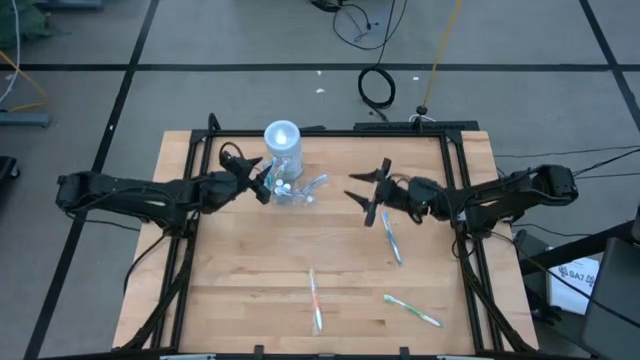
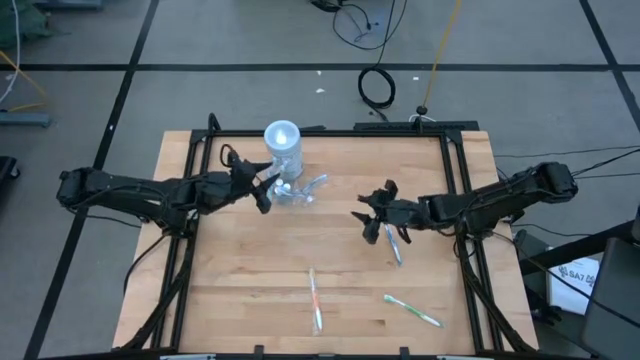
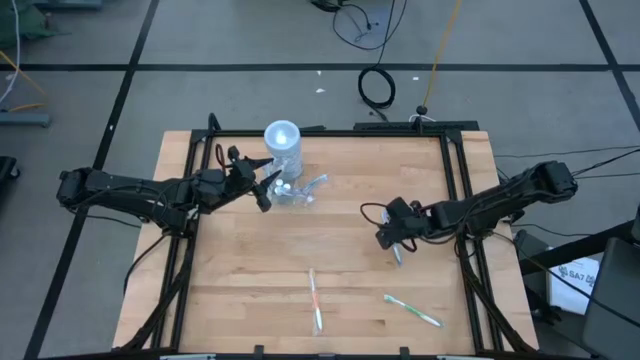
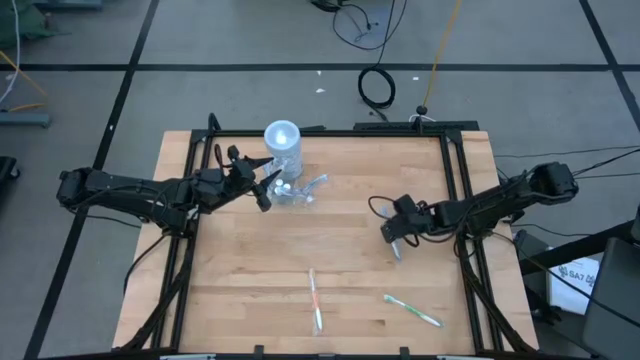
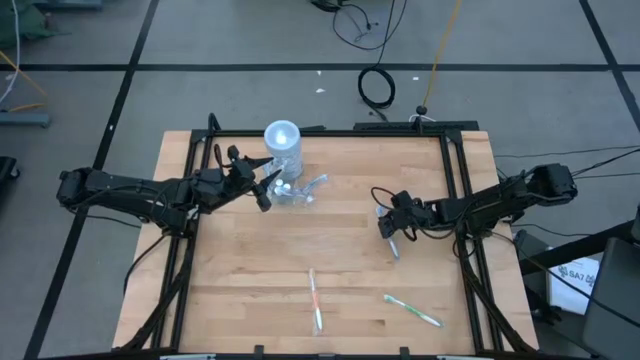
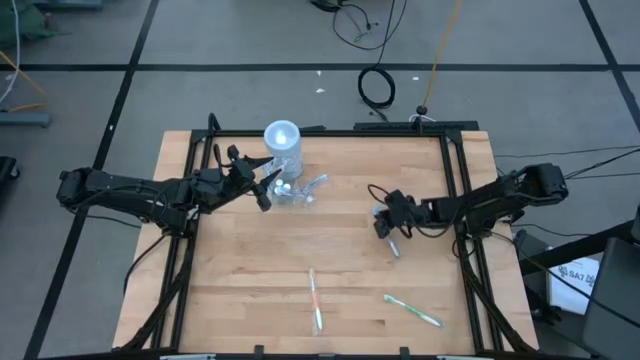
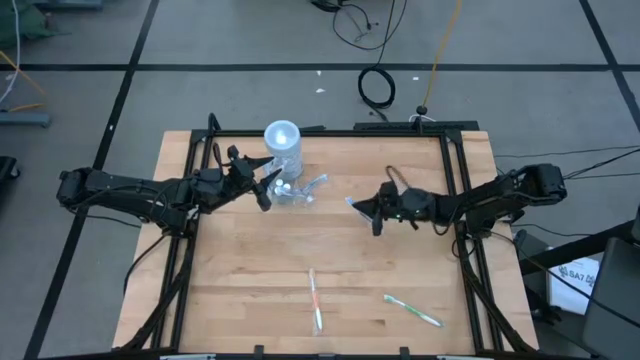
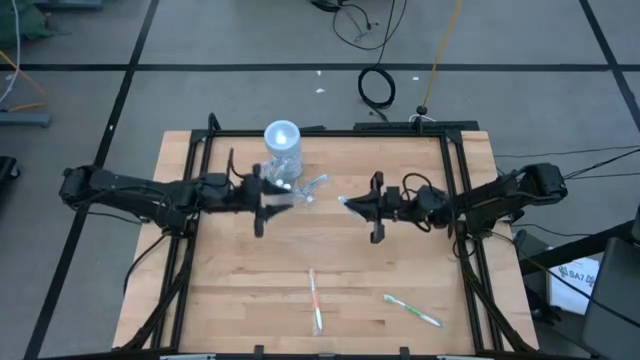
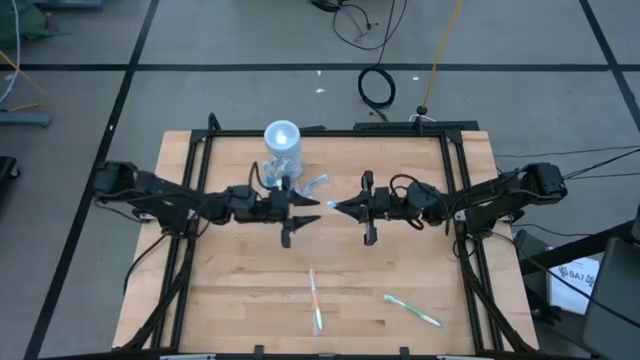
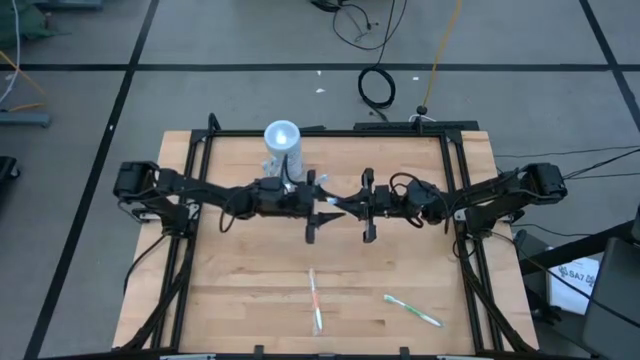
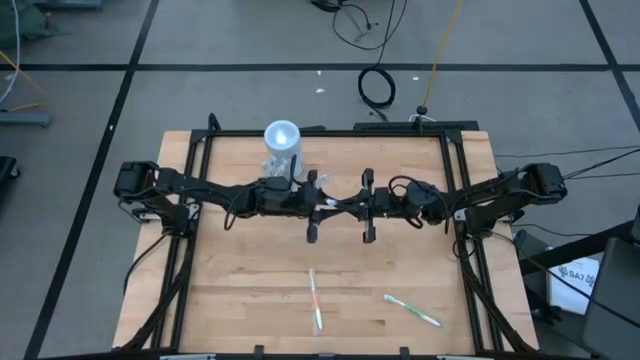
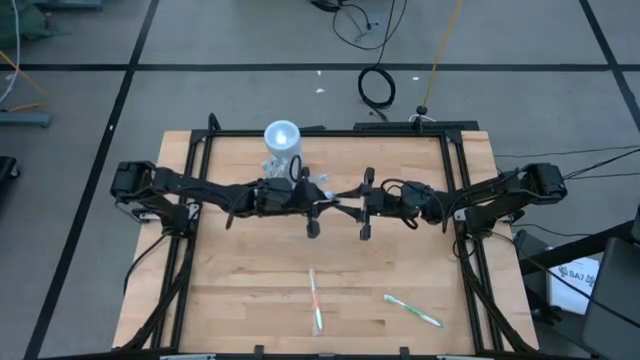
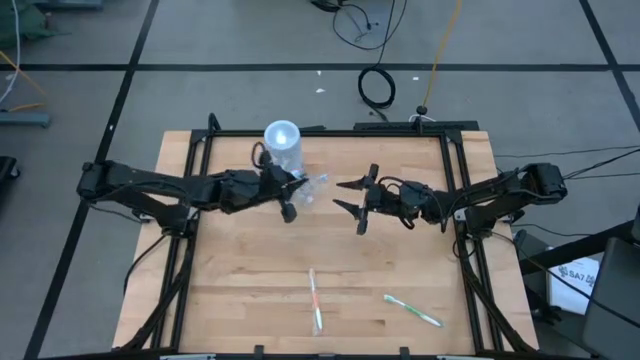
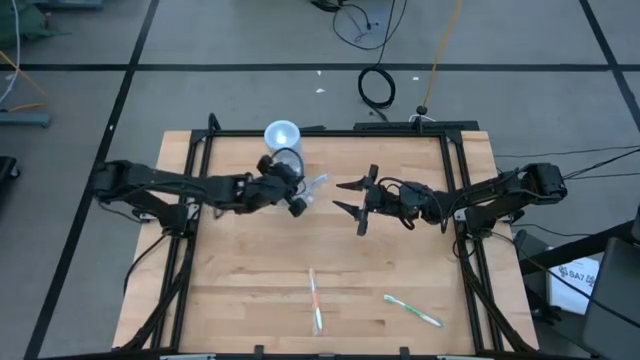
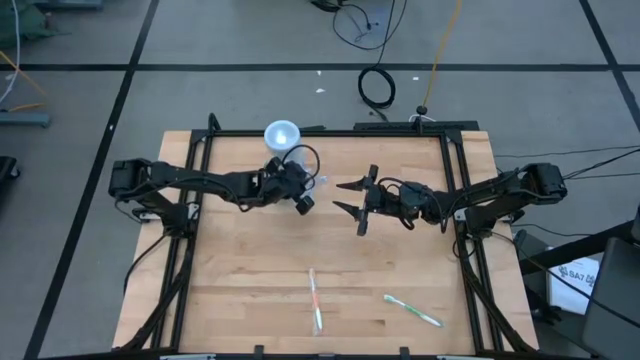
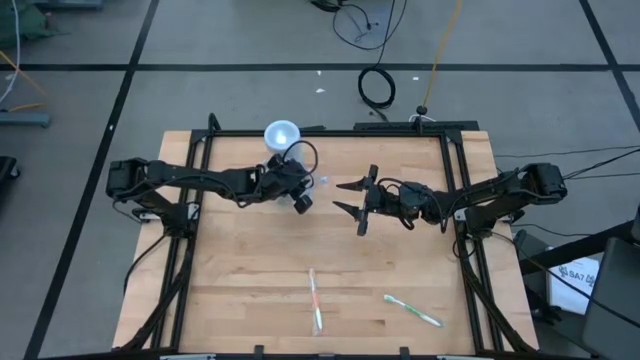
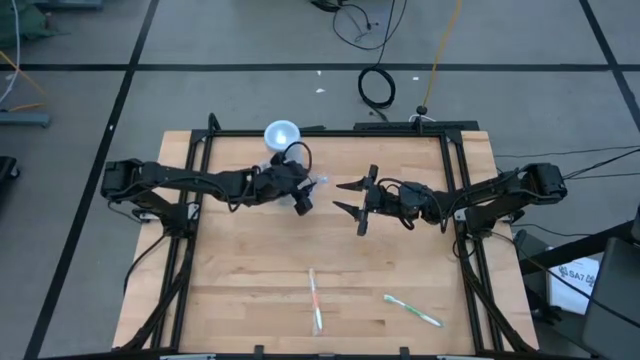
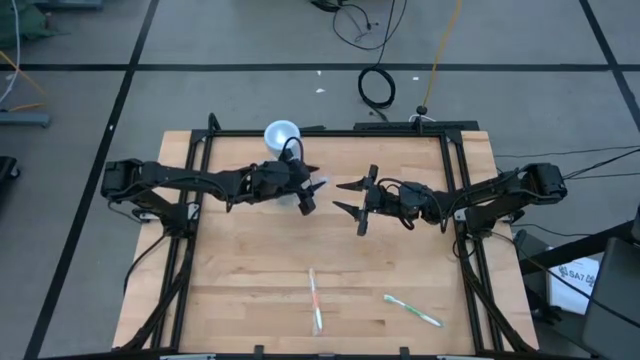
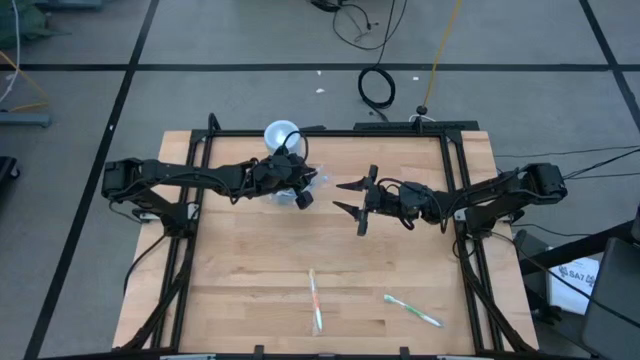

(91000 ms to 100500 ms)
Task: Pick & Place toothbrushing station
Put the blue toothbrush into the transparent organizer

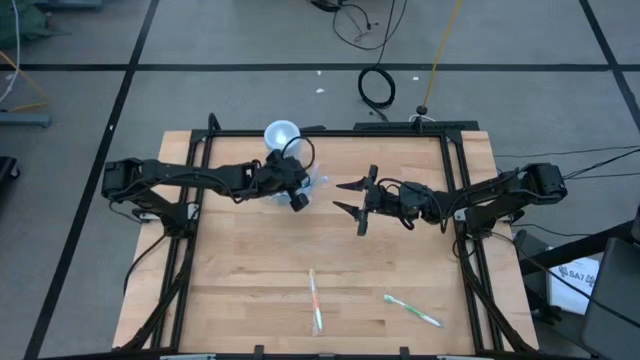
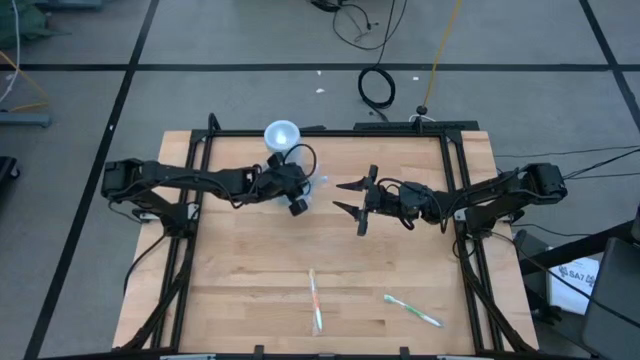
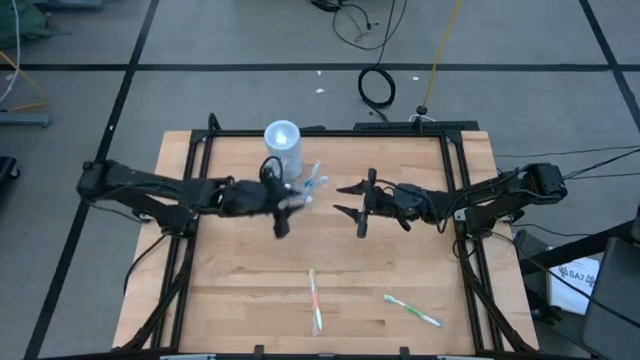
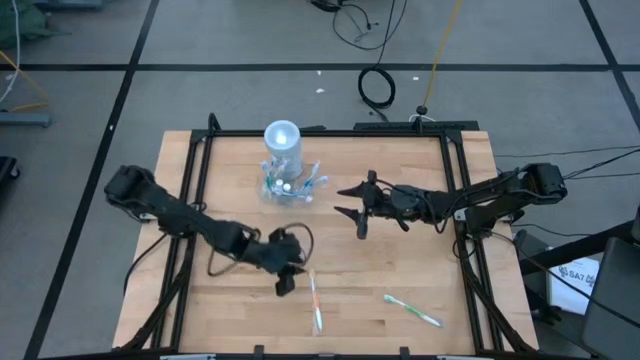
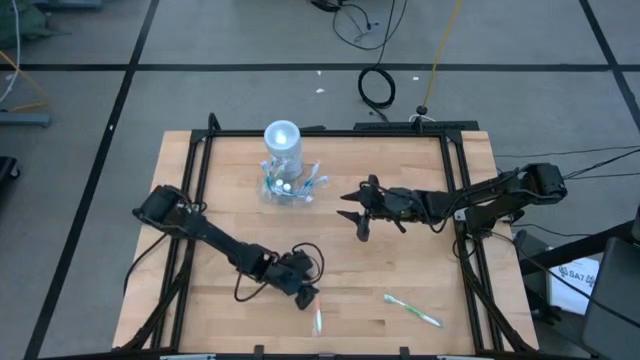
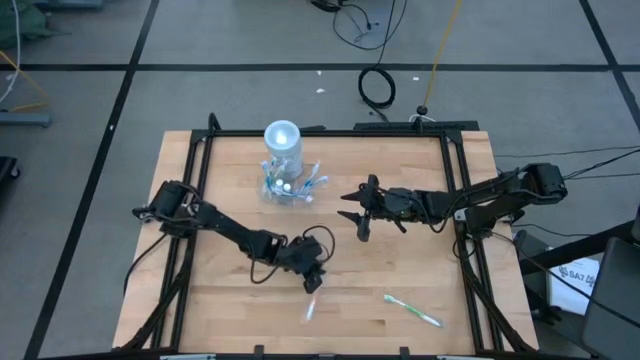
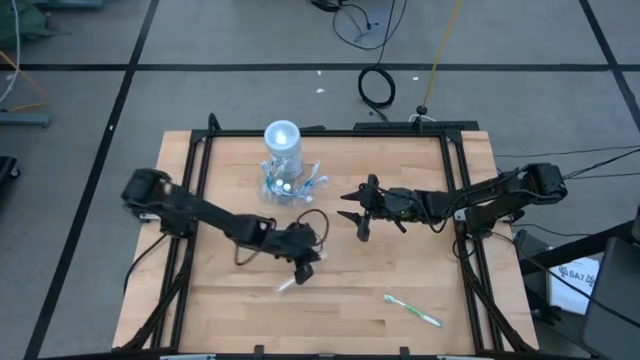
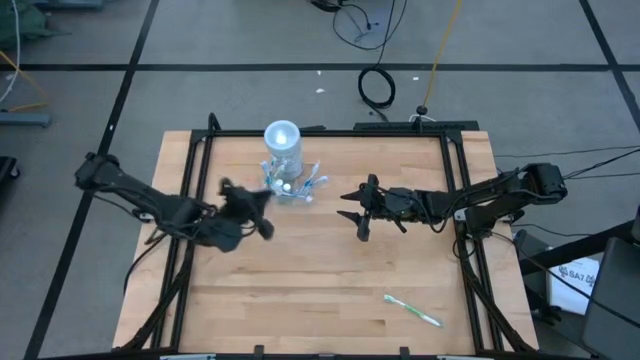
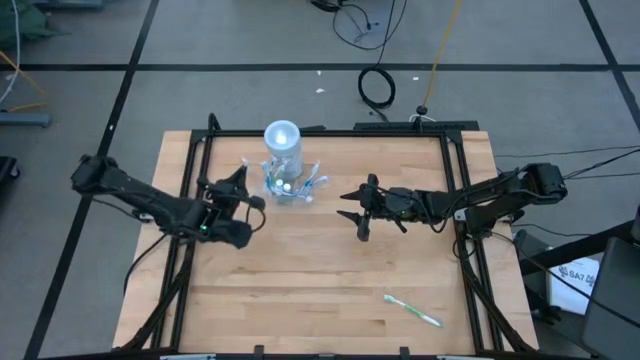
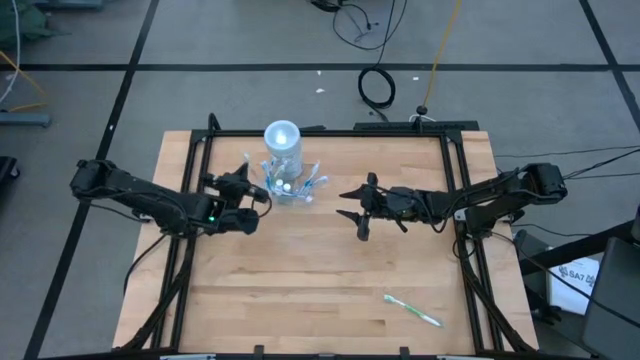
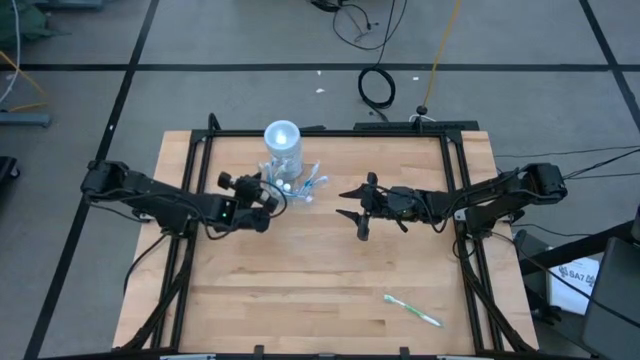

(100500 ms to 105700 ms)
Put the orange toothbrush into the transparent organizer

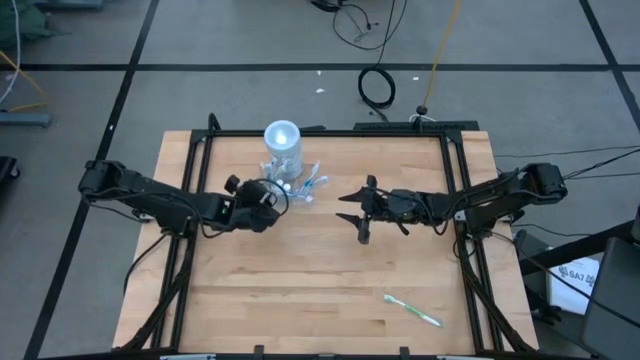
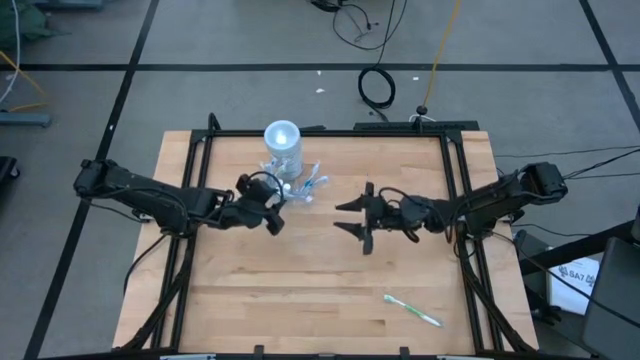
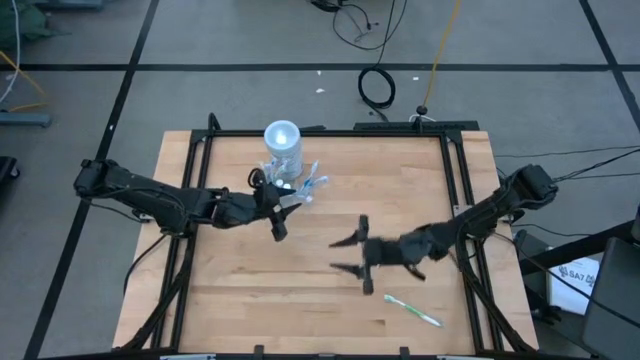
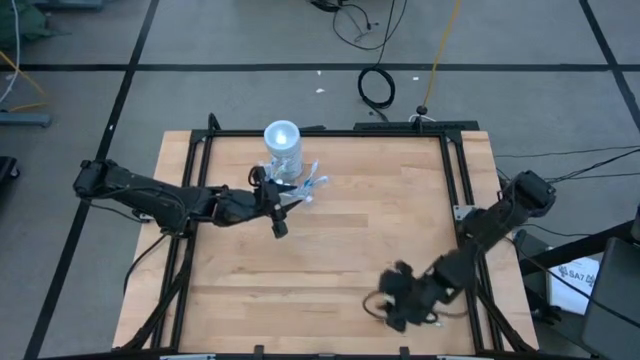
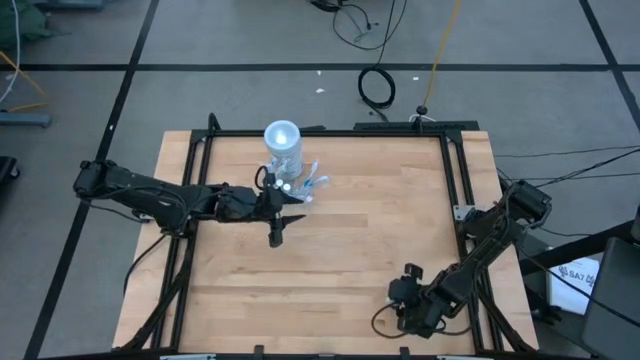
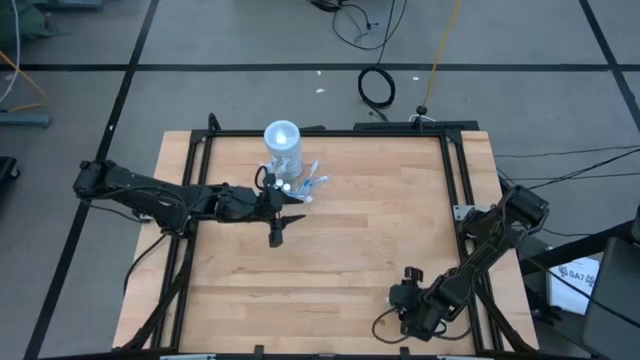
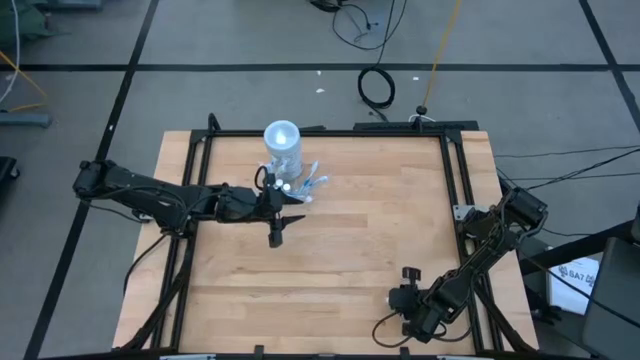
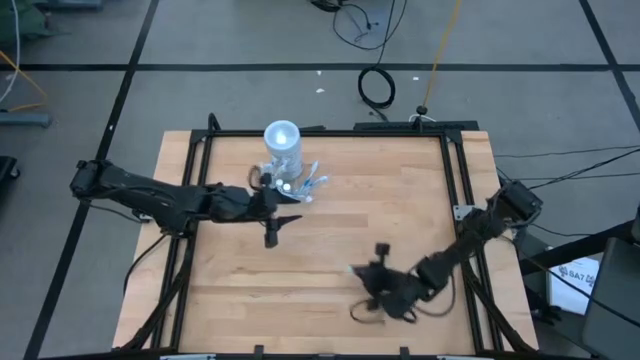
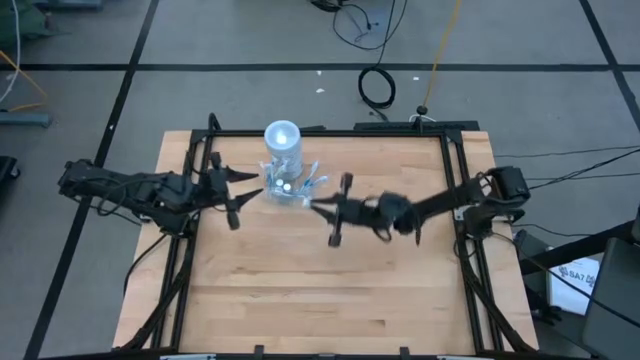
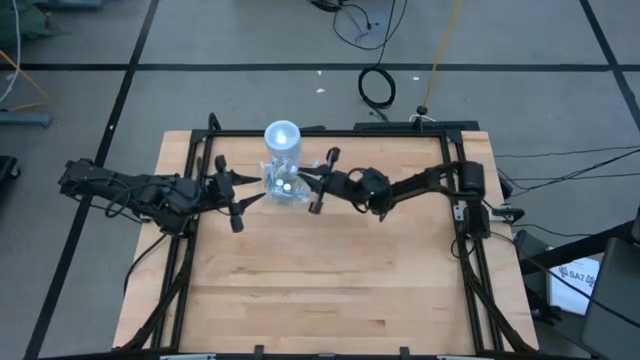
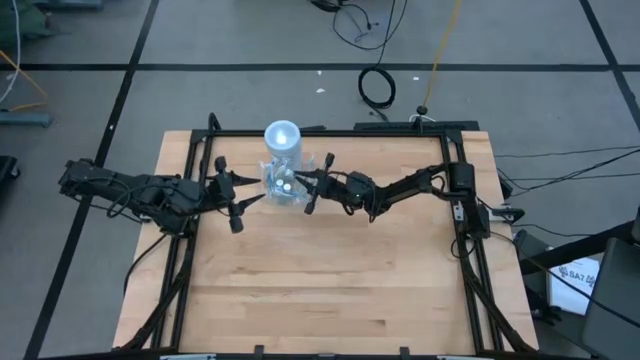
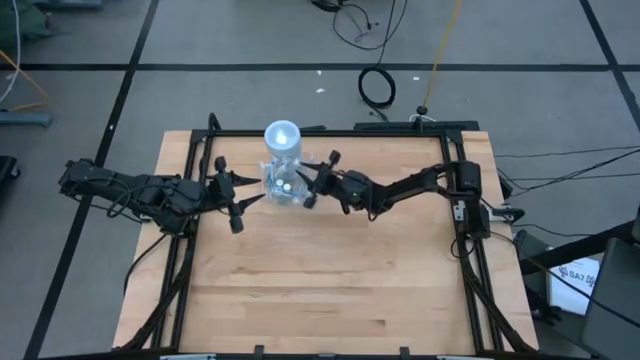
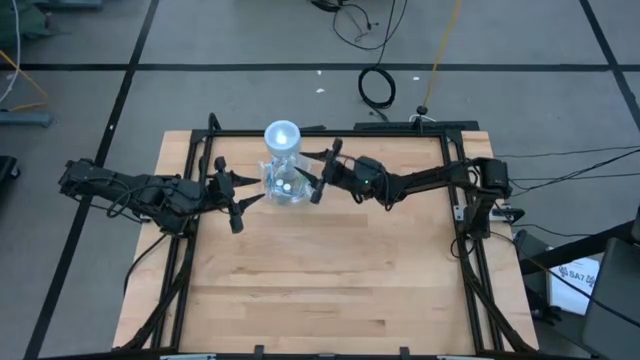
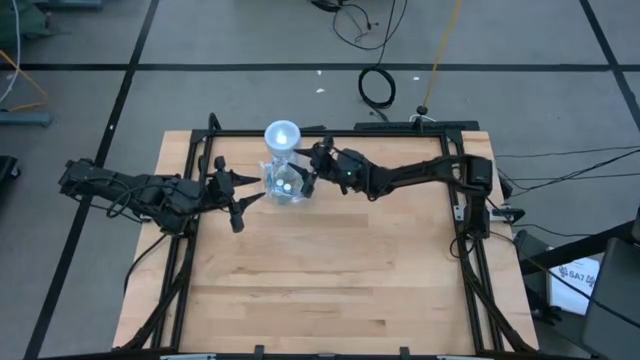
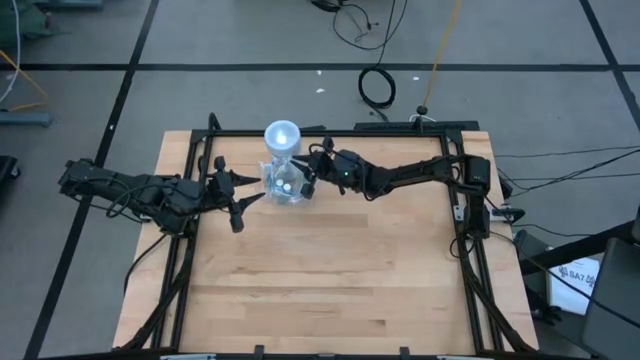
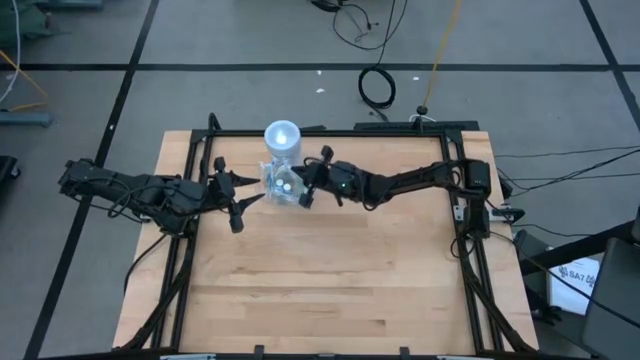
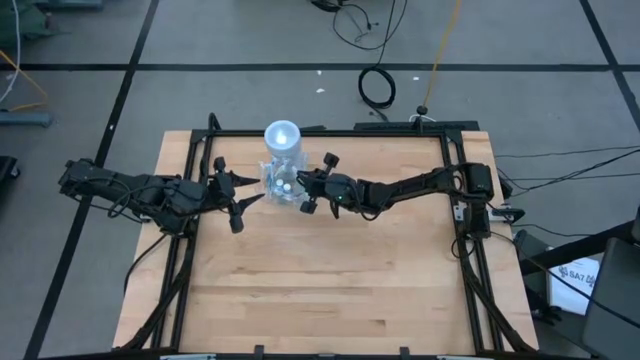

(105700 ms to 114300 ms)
Put the green toothbrush into the transparent organizer
